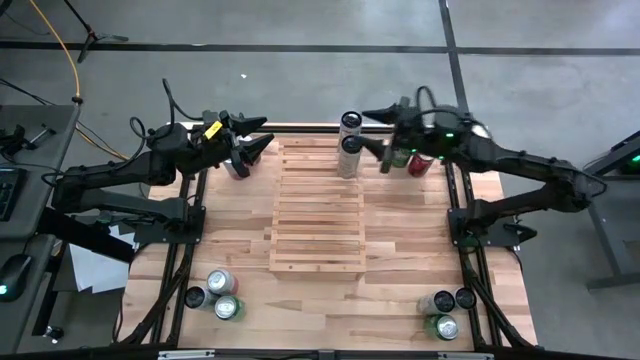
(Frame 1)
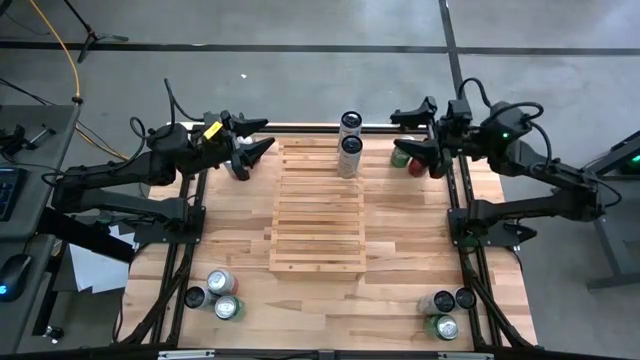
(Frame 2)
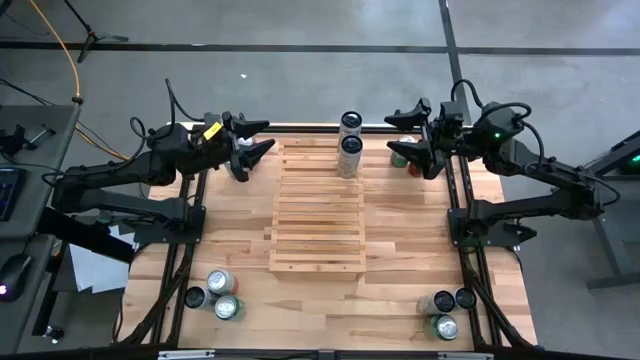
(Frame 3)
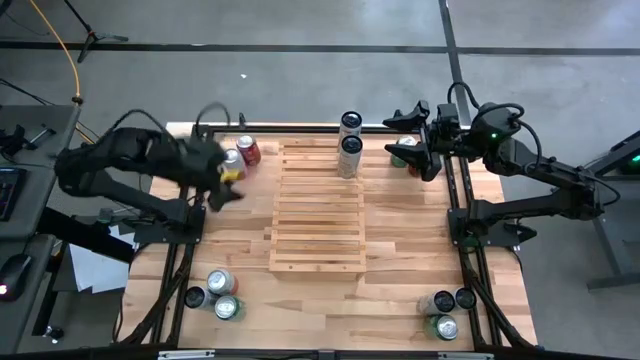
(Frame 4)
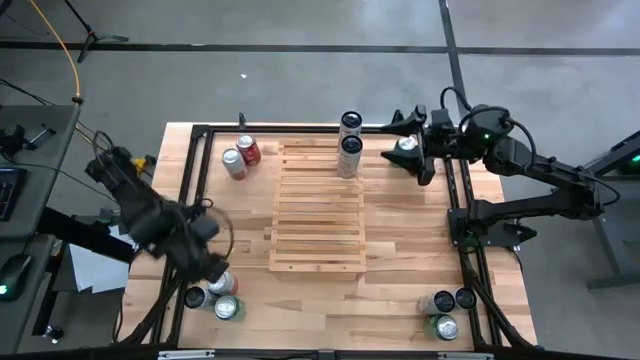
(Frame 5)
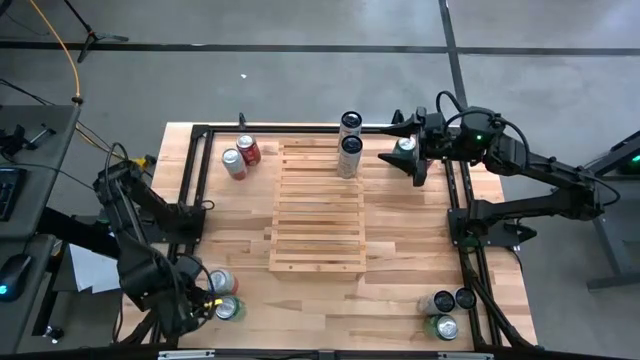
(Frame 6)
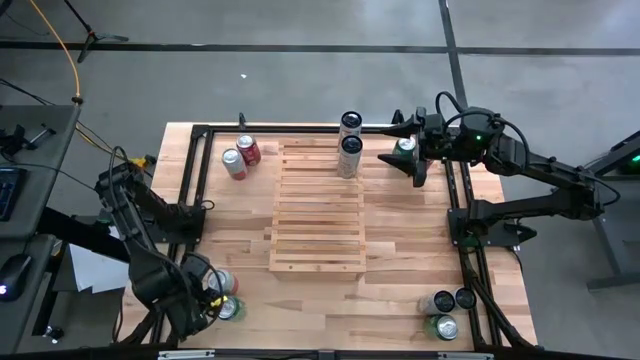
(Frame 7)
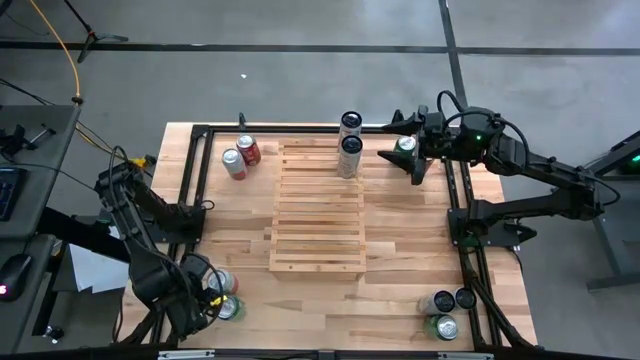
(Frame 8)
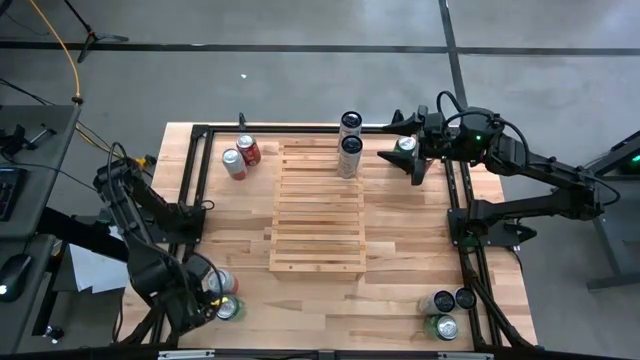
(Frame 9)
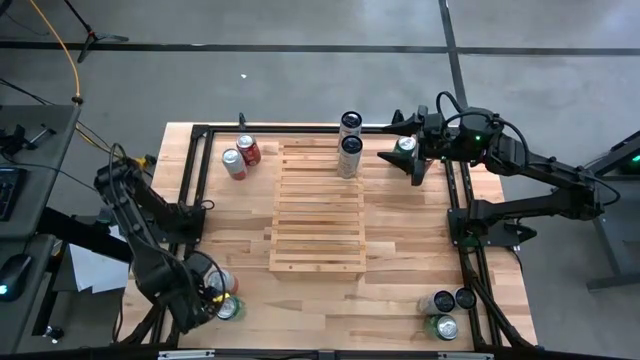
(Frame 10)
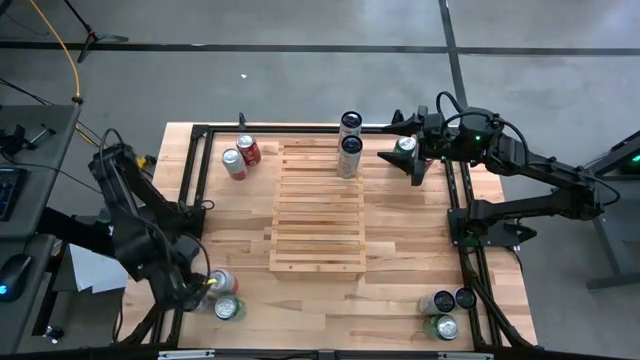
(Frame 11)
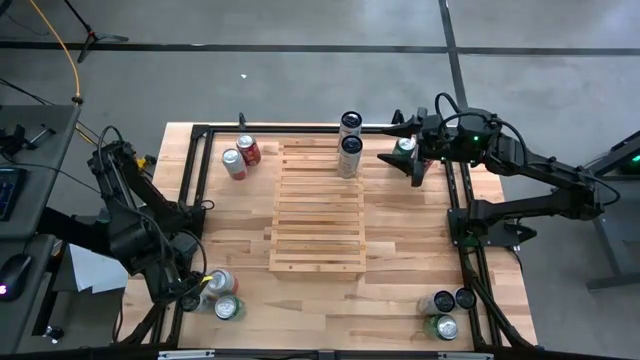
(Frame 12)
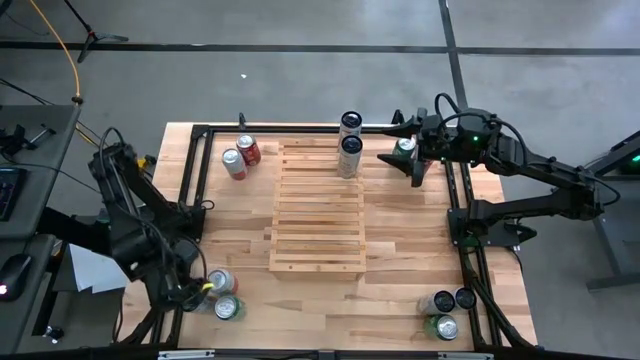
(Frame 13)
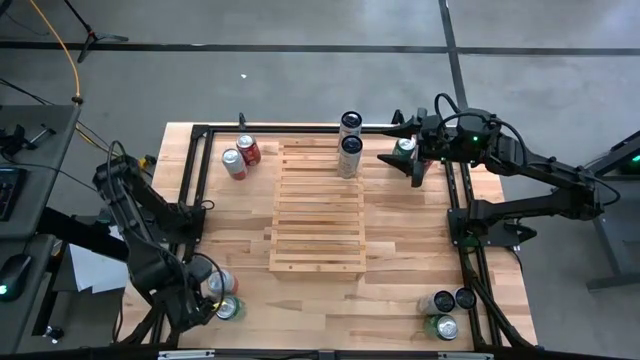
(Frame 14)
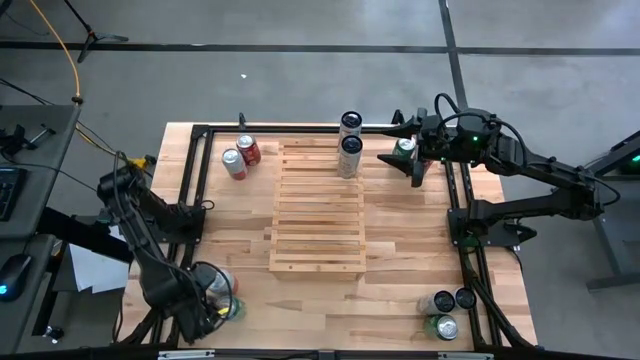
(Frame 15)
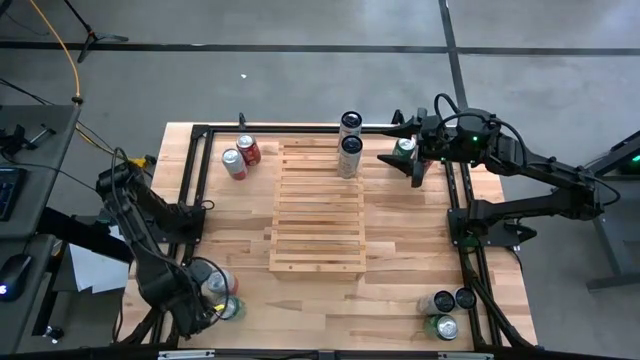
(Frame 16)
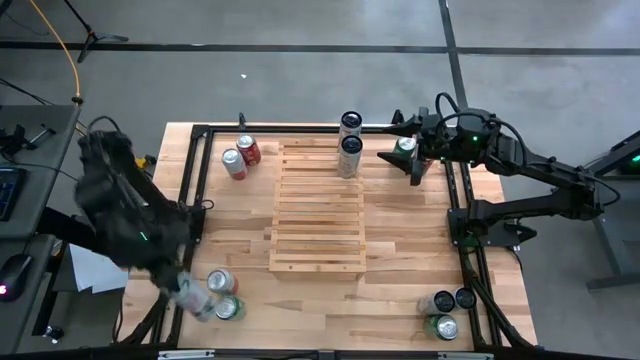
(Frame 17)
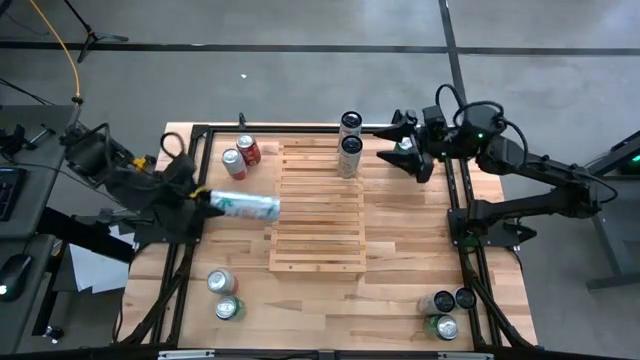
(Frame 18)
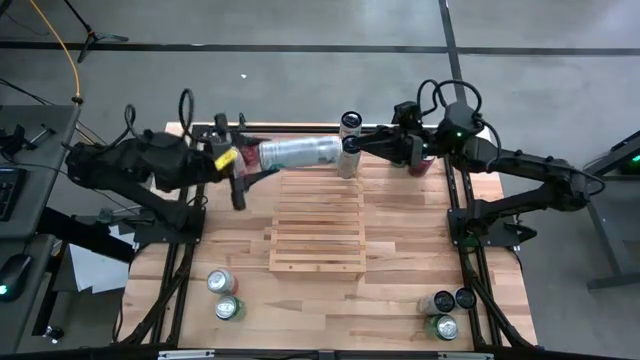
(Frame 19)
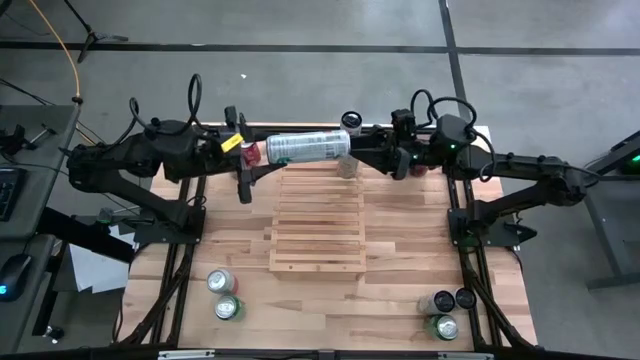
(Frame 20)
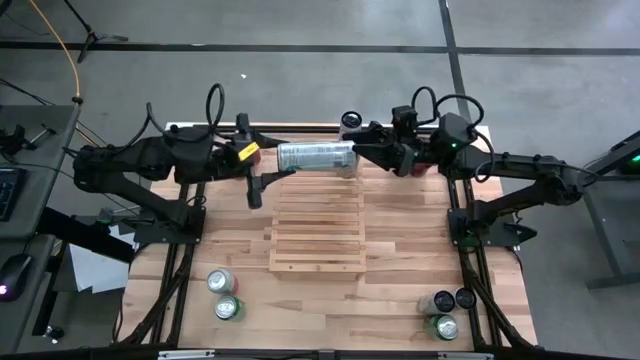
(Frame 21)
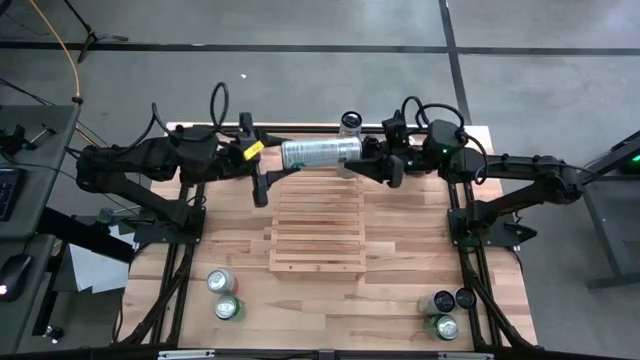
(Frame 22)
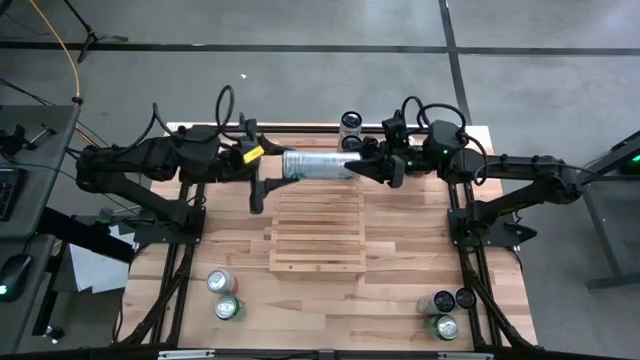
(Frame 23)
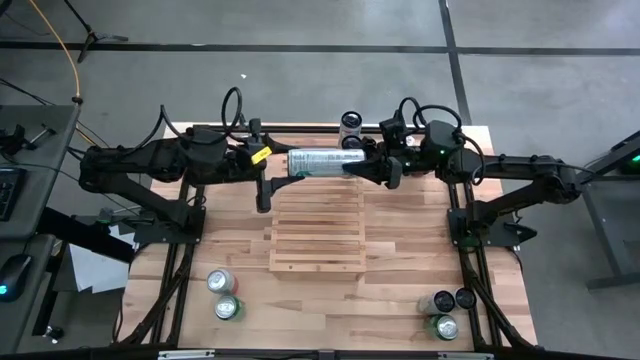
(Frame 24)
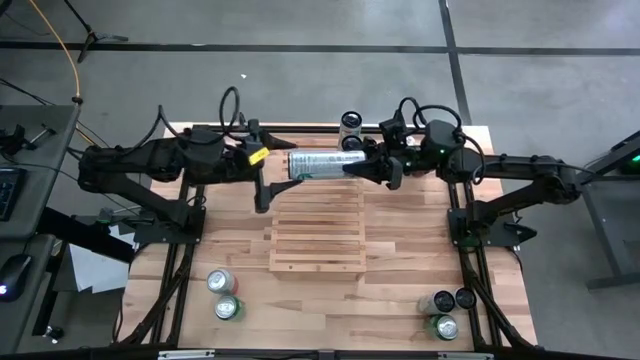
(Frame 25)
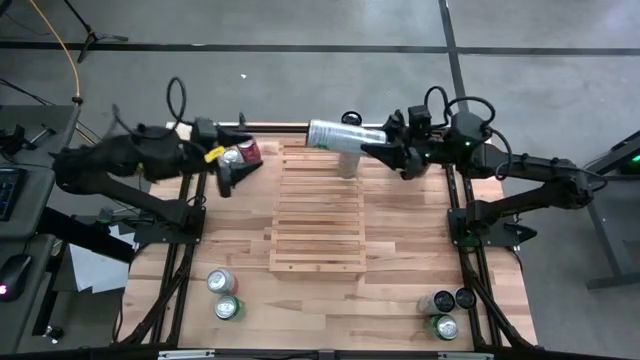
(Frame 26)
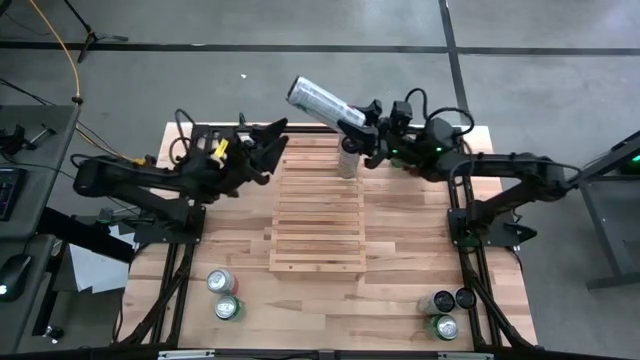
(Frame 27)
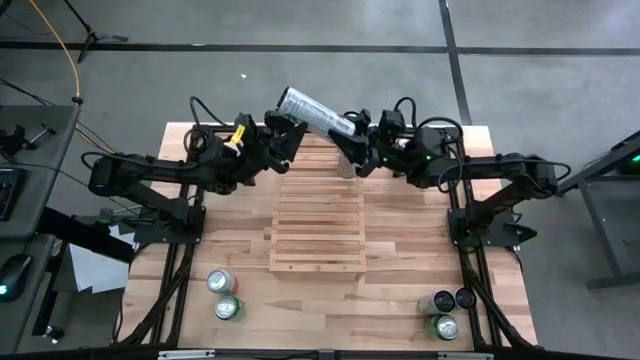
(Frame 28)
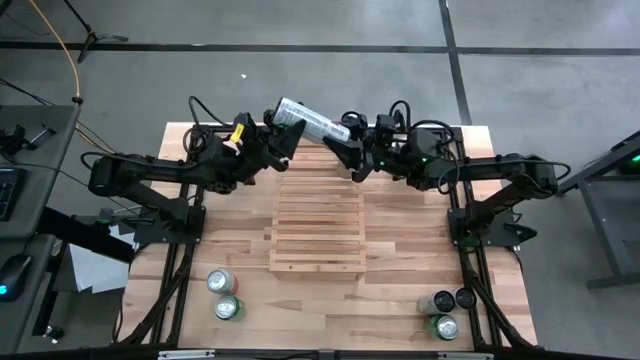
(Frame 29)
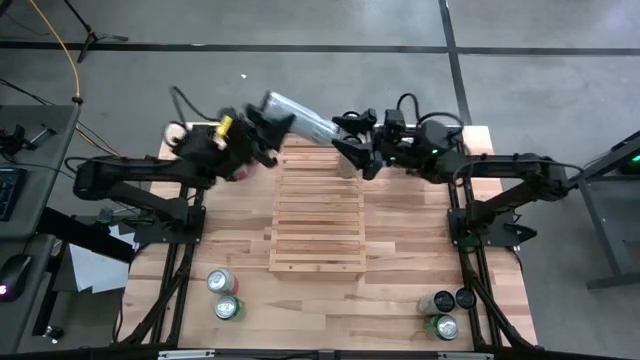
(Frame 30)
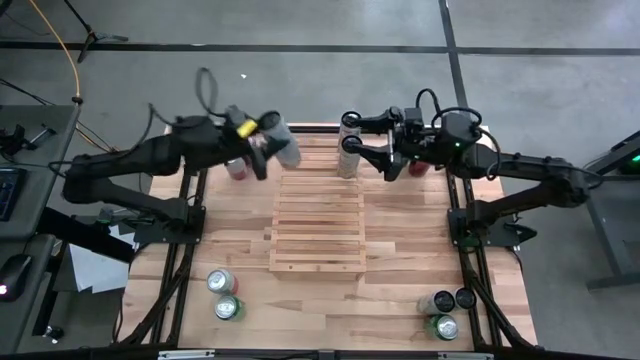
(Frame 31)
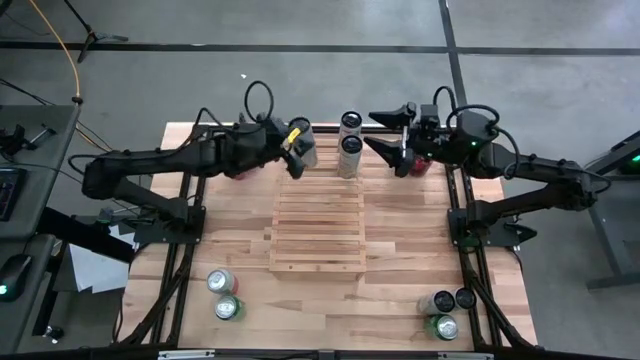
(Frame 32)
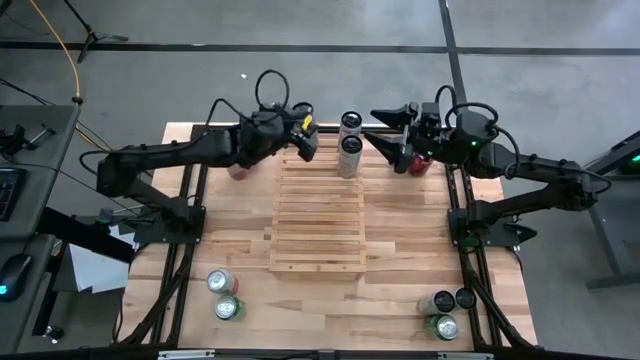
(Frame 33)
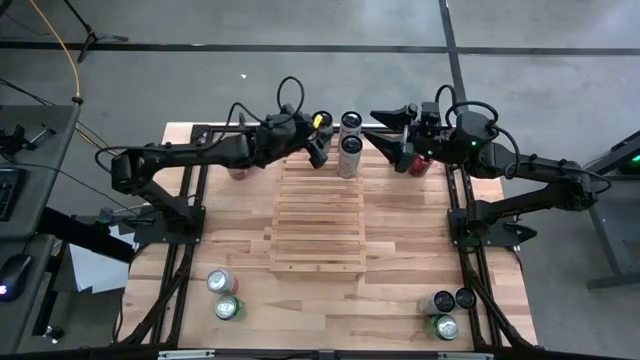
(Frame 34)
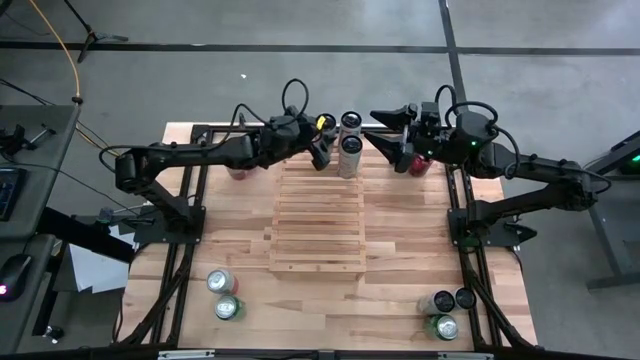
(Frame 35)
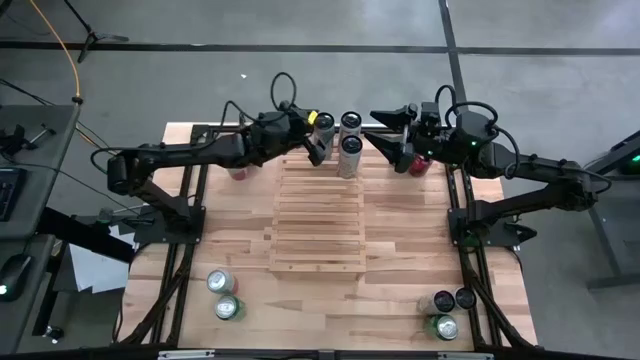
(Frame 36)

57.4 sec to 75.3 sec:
Task: Place canned beverage on shelf
Put the white pink soda can on the shelf
